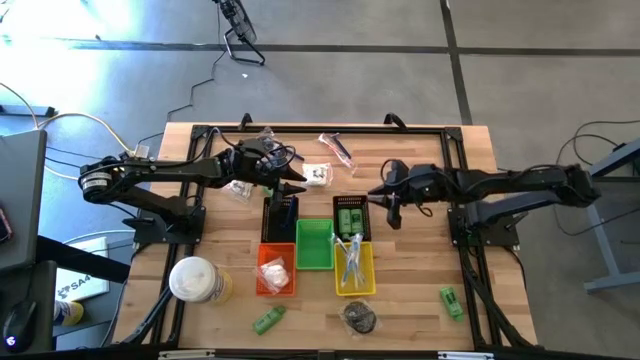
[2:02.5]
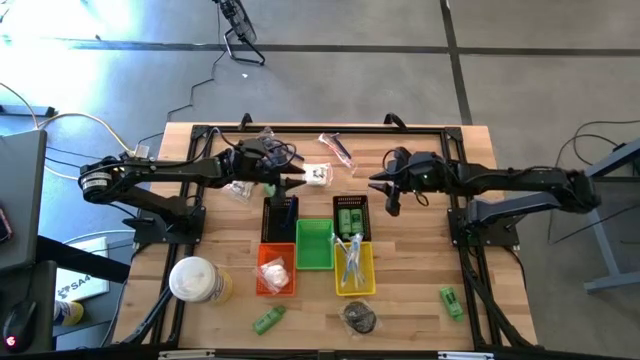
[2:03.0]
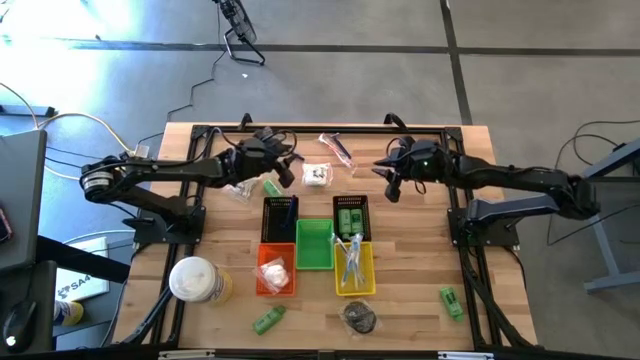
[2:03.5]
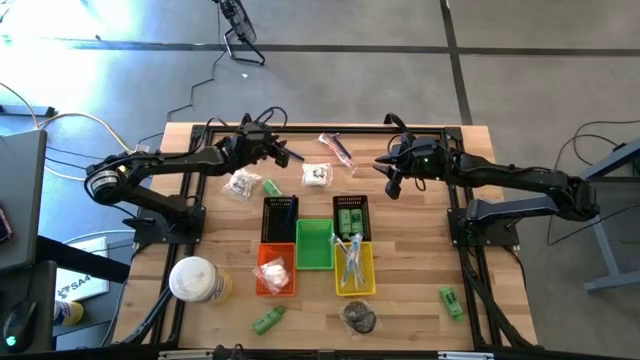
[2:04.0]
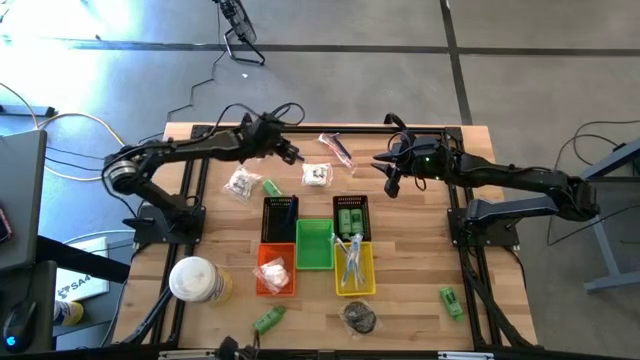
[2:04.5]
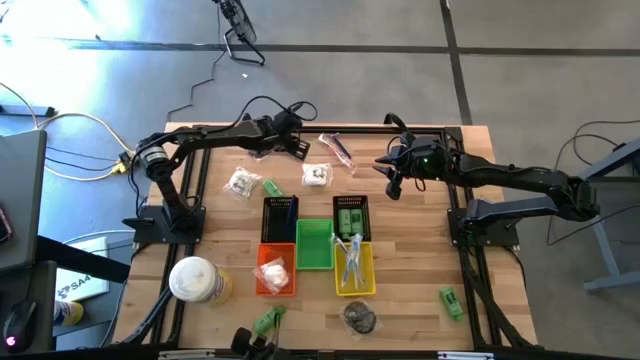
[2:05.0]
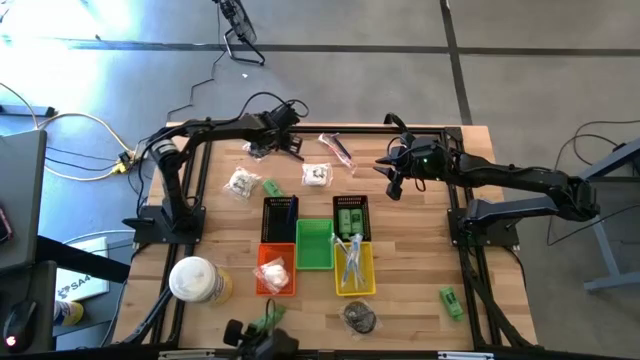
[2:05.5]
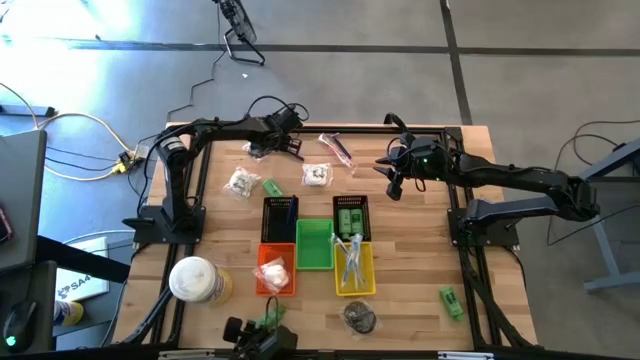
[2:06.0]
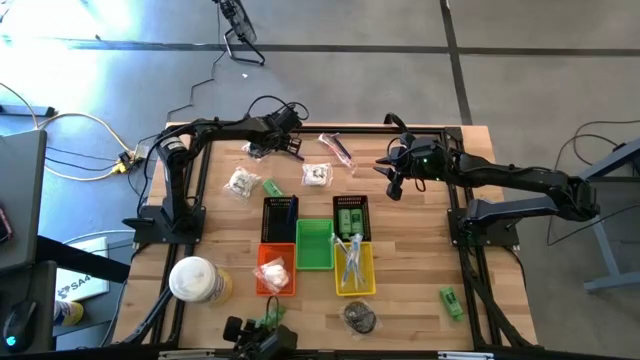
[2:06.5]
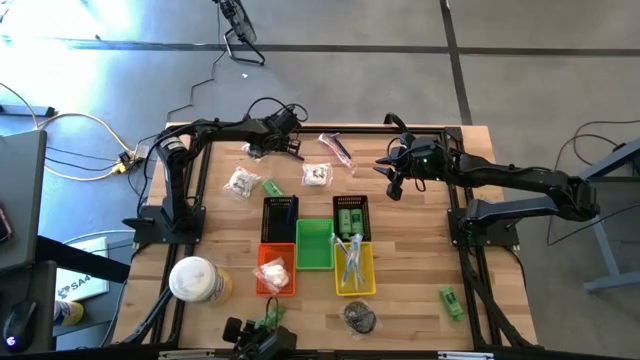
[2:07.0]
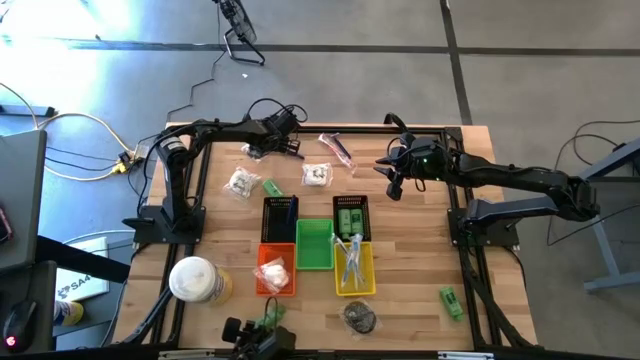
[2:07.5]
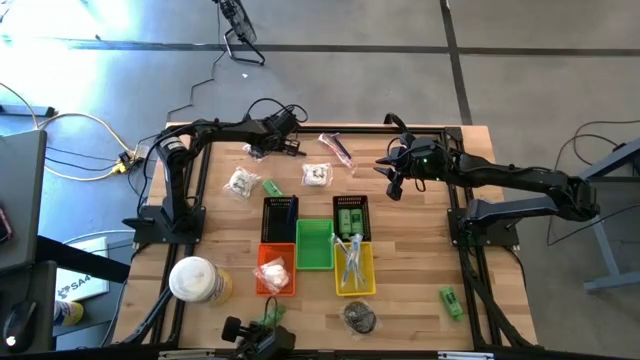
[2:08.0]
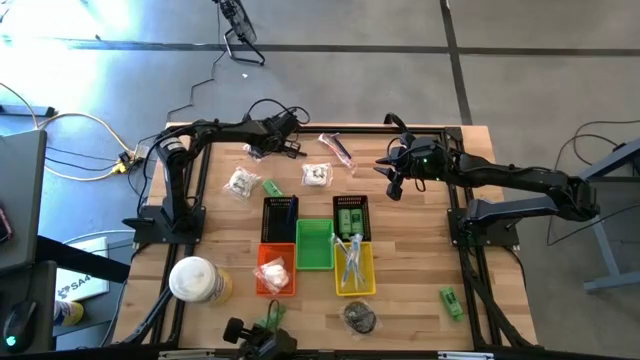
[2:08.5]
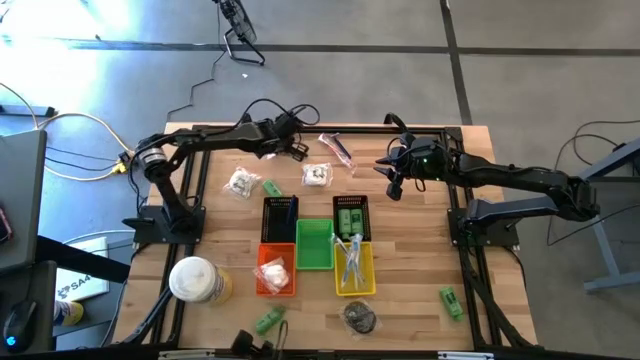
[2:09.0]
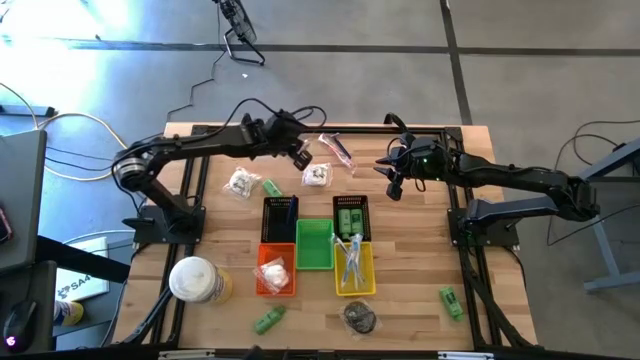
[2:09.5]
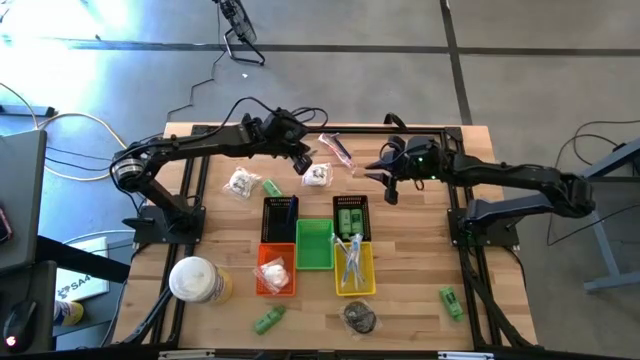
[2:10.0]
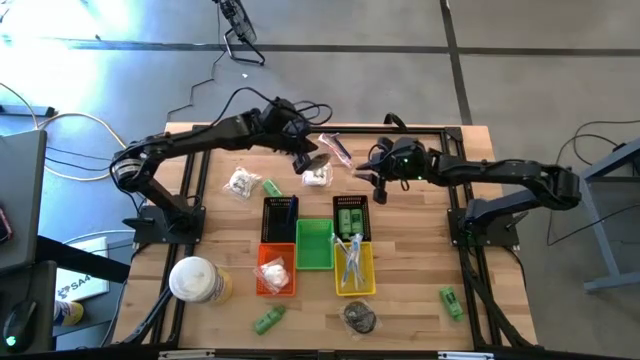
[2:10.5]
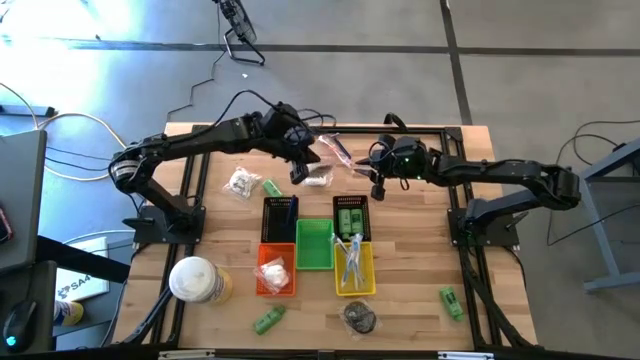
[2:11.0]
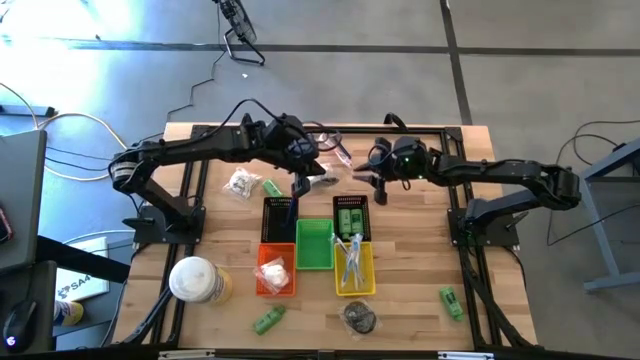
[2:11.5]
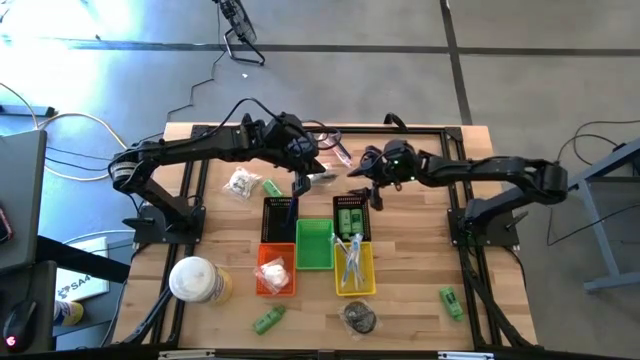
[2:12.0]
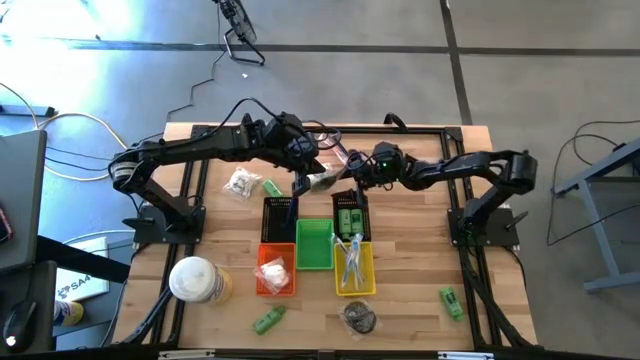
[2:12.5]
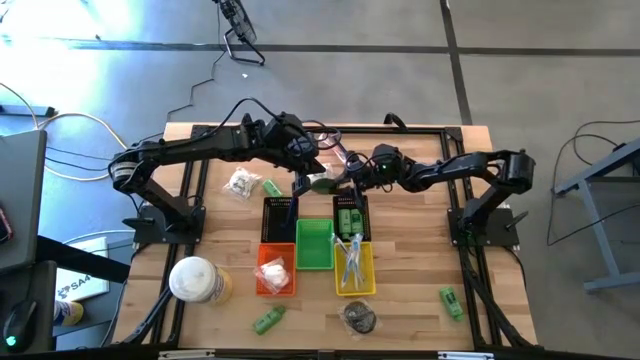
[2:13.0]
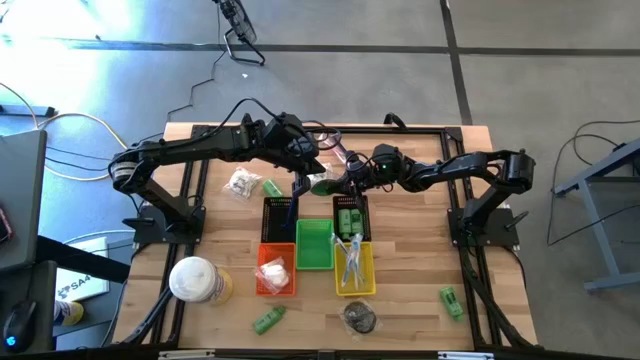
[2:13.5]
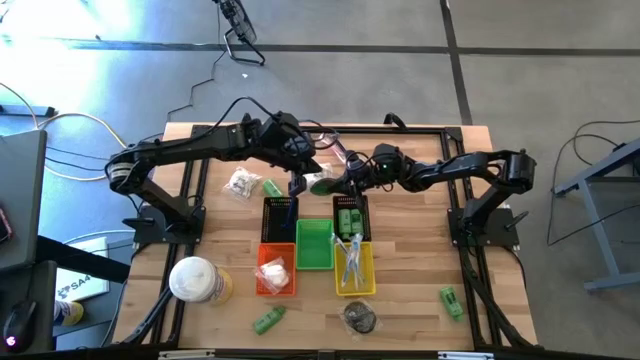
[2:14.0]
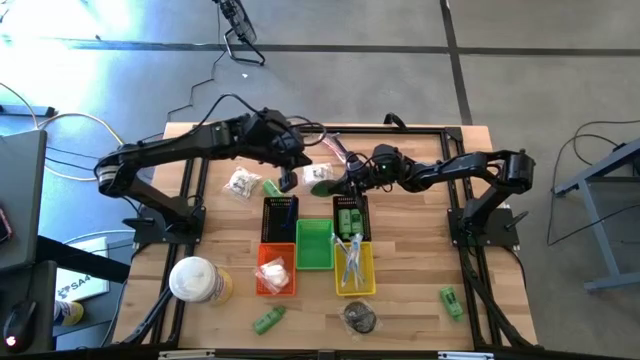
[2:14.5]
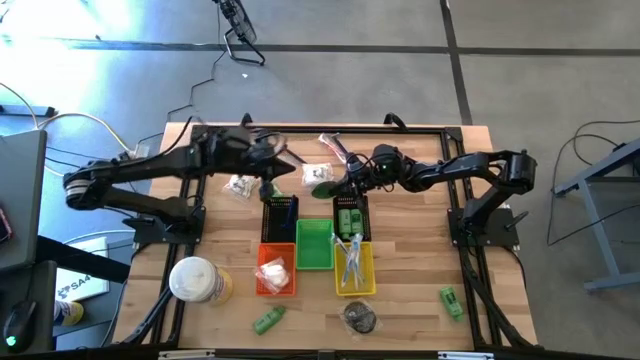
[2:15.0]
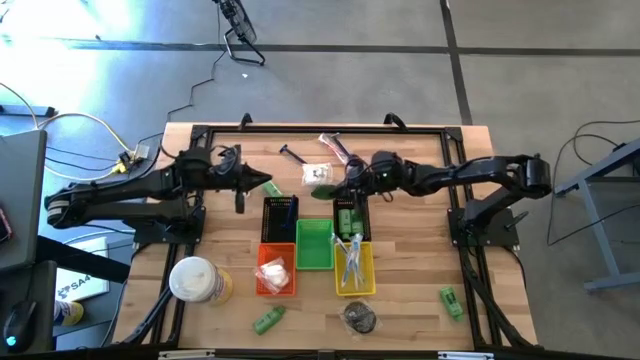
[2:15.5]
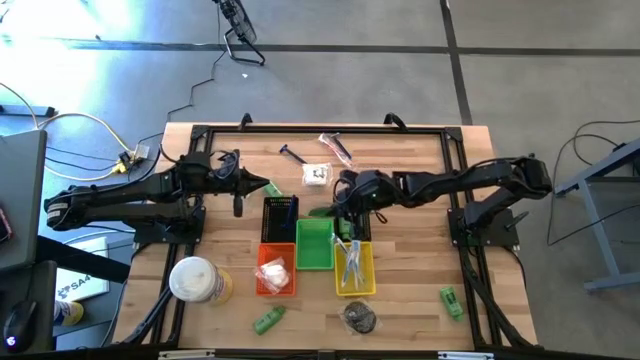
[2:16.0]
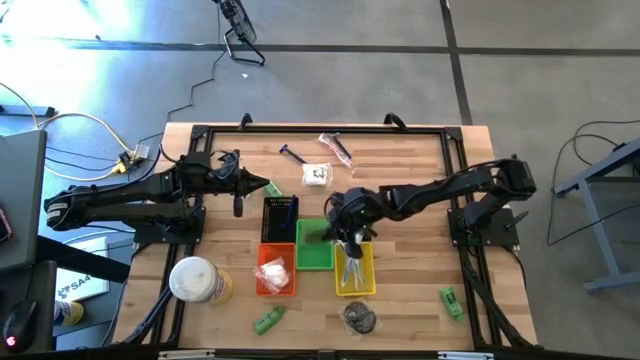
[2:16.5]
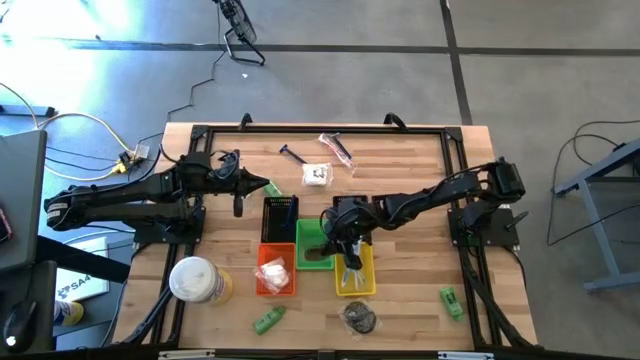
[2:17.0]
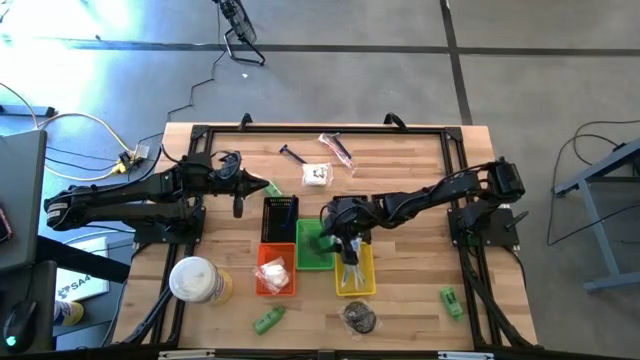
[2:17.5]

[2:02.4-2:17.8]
Task: Pick & Place Travel size toiletries
Put the top black hairbrush into the green bin

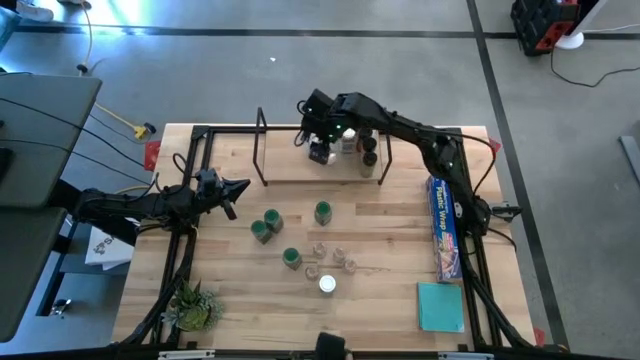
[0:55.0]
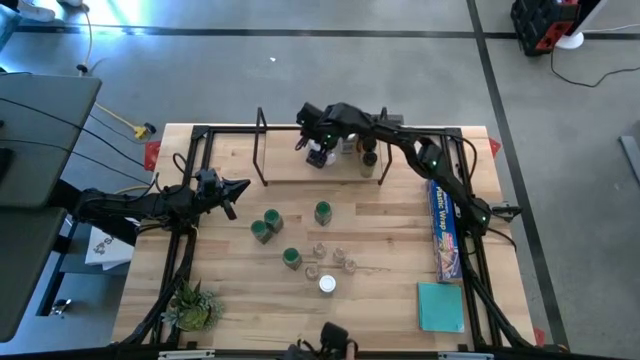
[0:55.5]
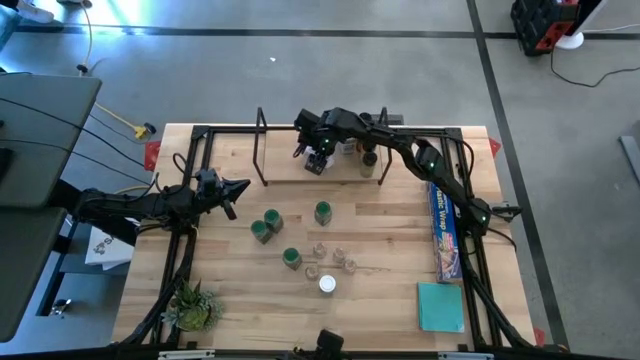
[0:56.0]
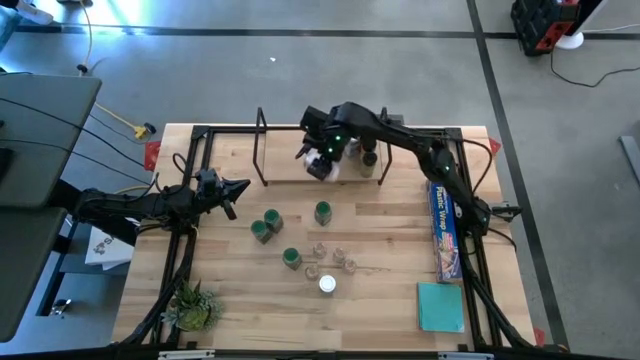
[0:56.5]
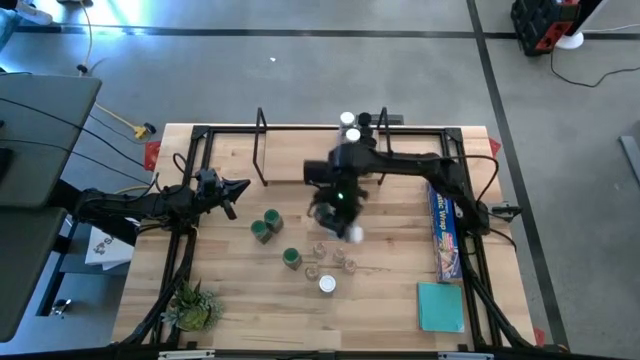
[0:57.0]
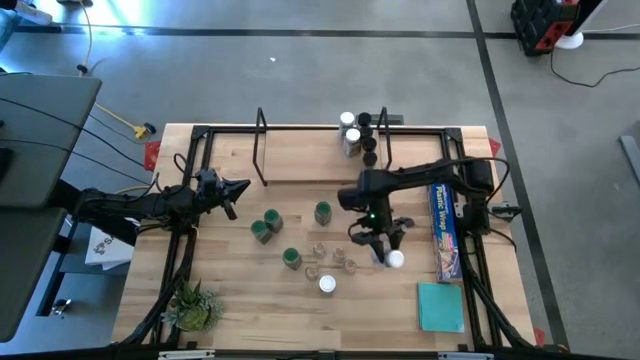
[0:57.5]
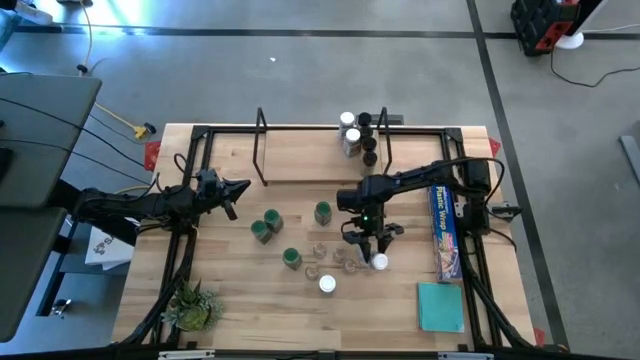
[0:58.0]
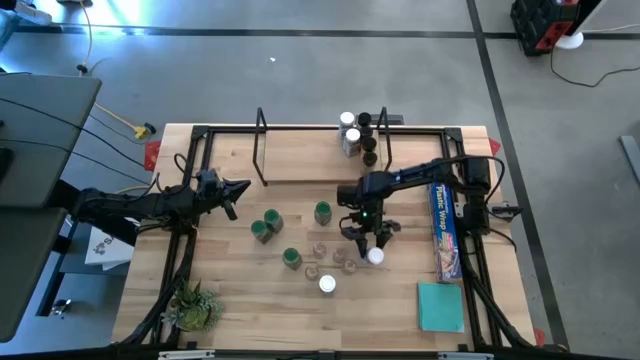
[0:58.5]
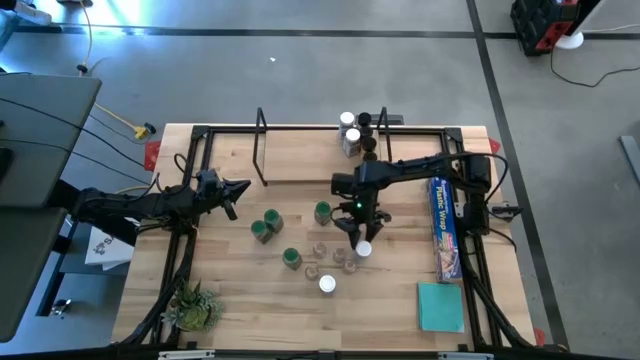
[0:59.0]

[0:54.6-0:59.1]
Task: Shelf spices
Remove the bottom left white seasoning bottle from the shelf
